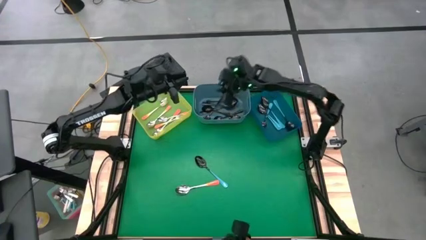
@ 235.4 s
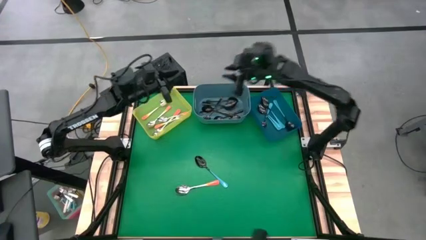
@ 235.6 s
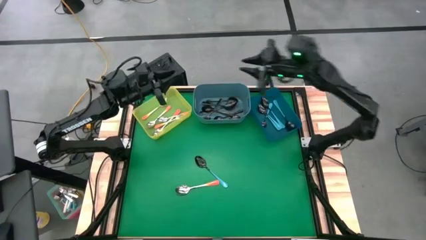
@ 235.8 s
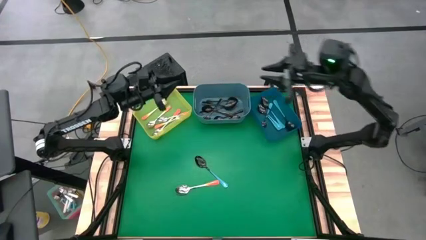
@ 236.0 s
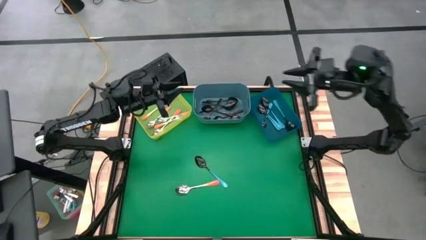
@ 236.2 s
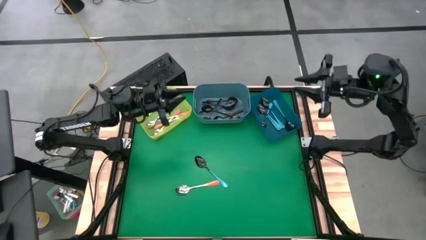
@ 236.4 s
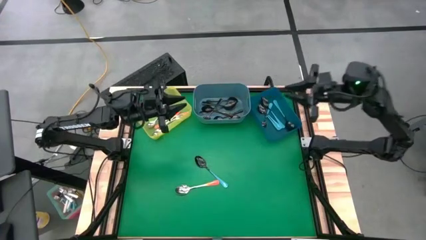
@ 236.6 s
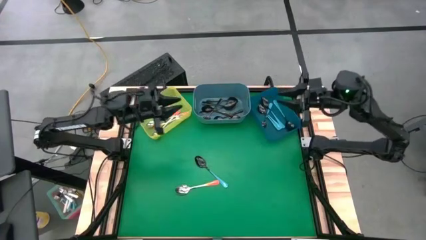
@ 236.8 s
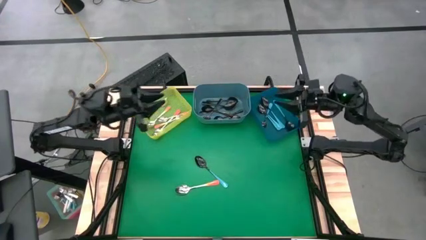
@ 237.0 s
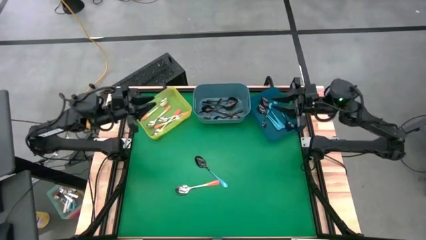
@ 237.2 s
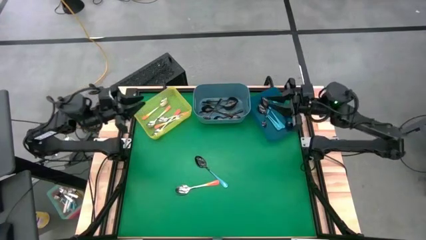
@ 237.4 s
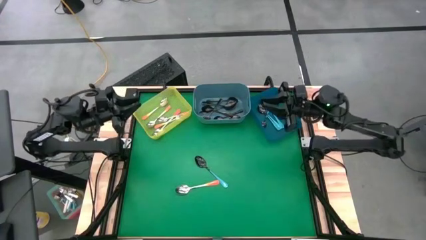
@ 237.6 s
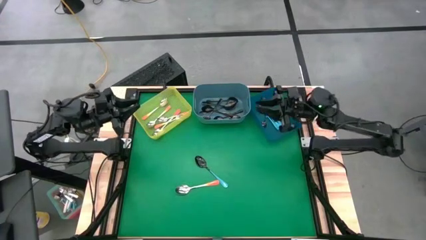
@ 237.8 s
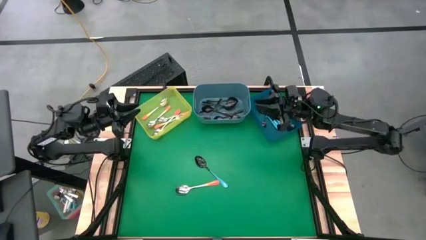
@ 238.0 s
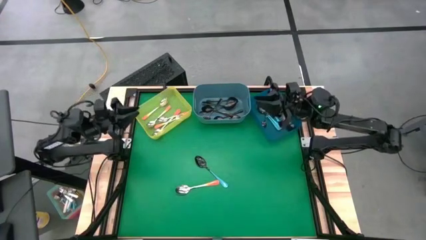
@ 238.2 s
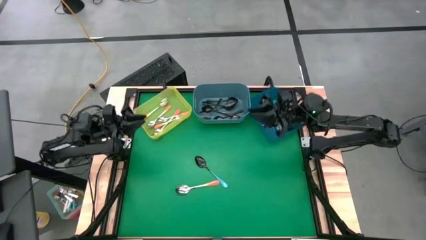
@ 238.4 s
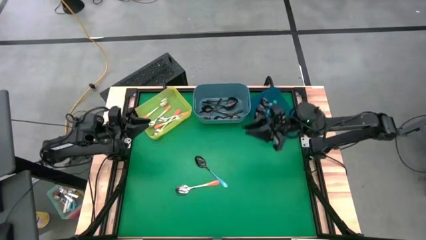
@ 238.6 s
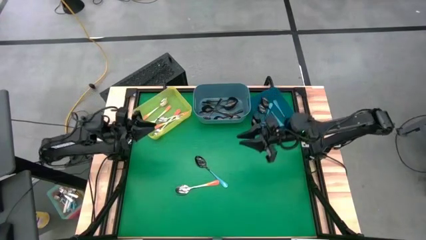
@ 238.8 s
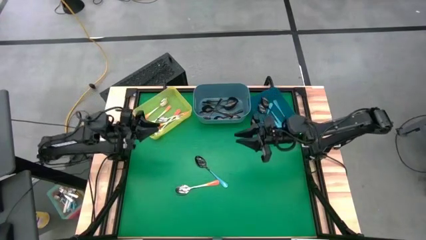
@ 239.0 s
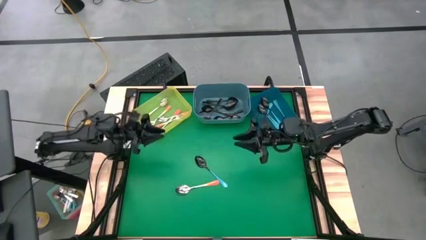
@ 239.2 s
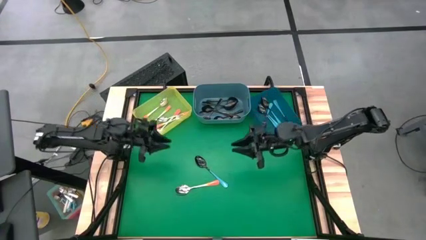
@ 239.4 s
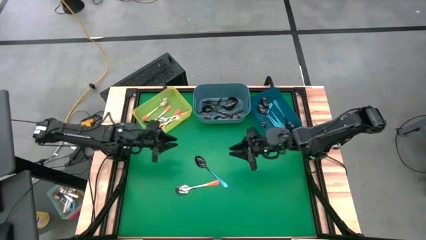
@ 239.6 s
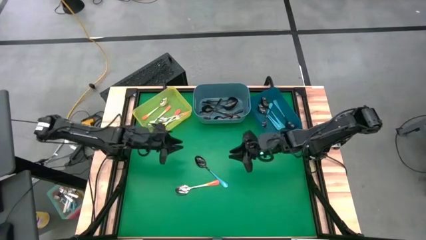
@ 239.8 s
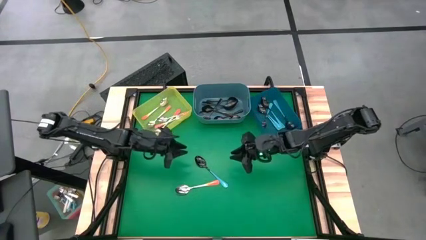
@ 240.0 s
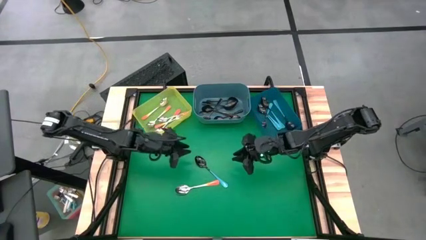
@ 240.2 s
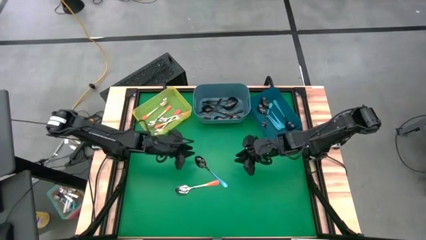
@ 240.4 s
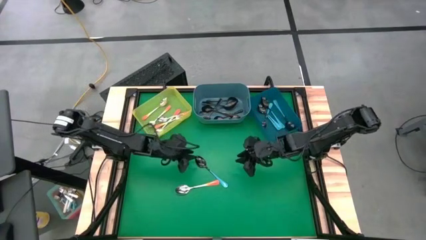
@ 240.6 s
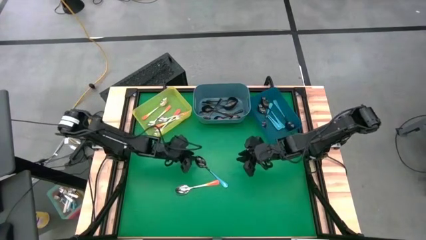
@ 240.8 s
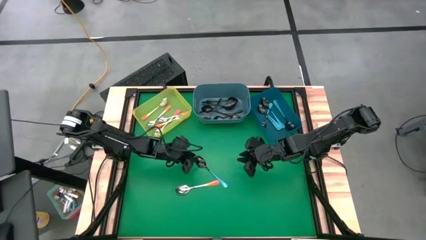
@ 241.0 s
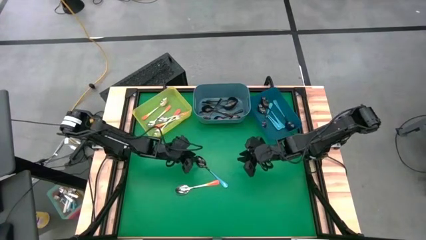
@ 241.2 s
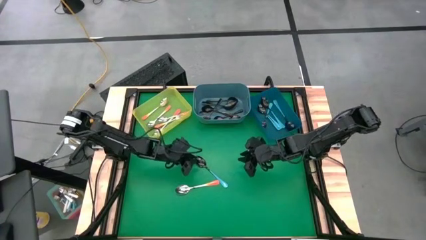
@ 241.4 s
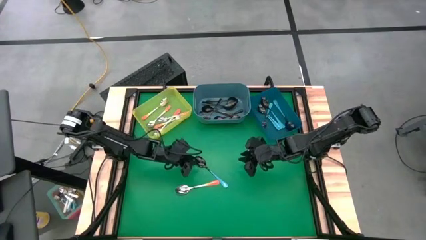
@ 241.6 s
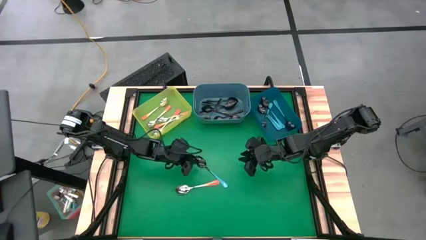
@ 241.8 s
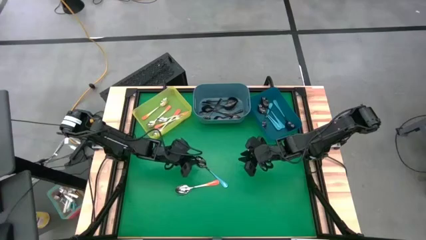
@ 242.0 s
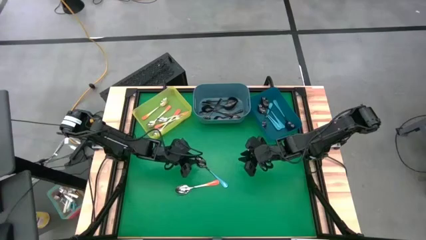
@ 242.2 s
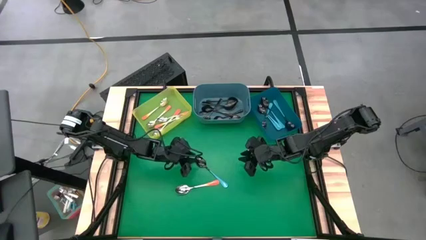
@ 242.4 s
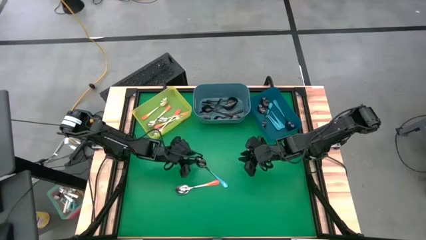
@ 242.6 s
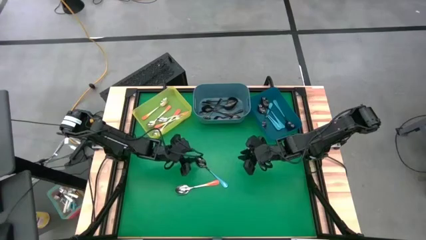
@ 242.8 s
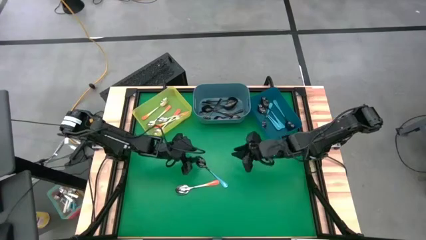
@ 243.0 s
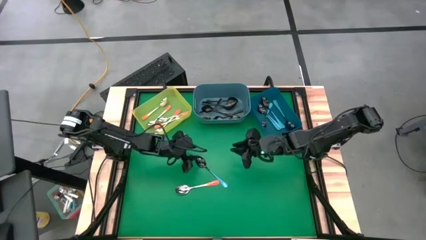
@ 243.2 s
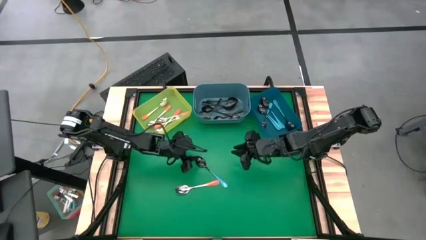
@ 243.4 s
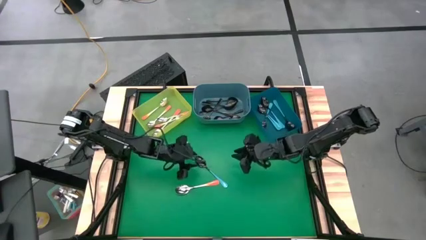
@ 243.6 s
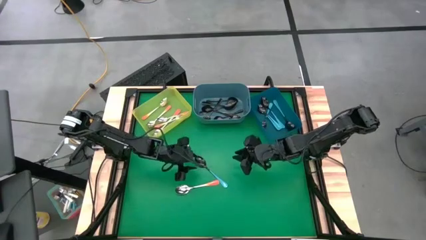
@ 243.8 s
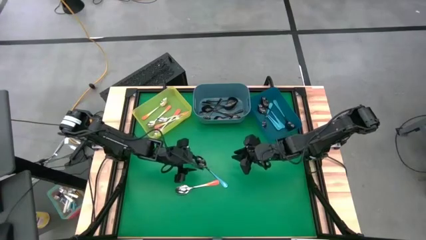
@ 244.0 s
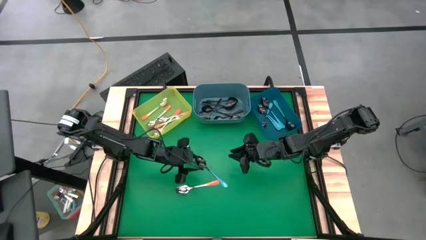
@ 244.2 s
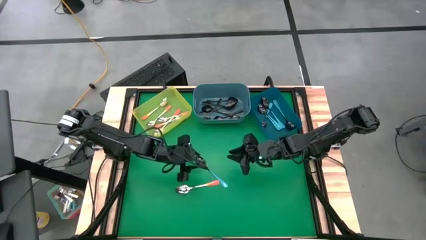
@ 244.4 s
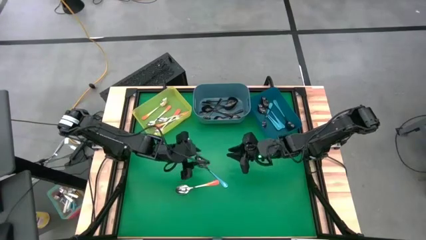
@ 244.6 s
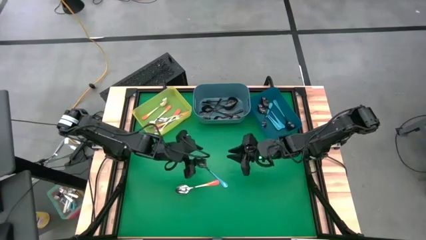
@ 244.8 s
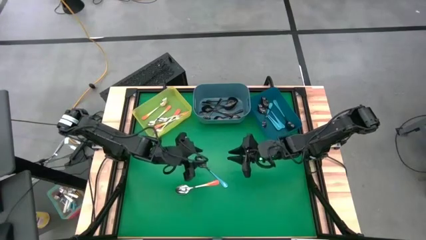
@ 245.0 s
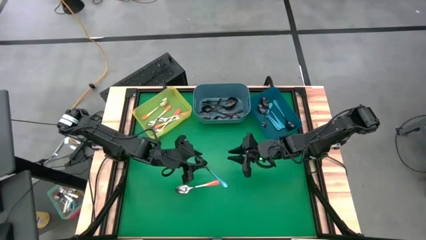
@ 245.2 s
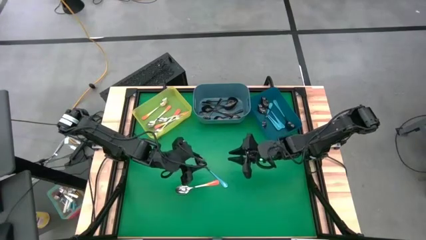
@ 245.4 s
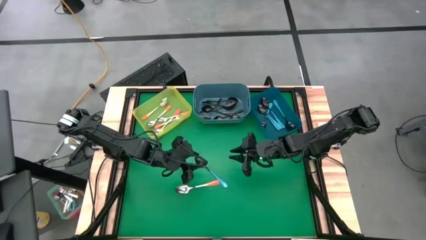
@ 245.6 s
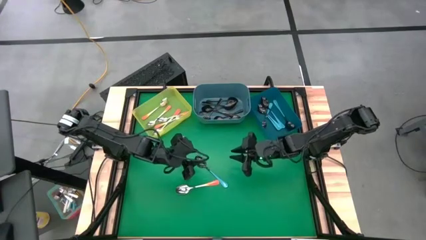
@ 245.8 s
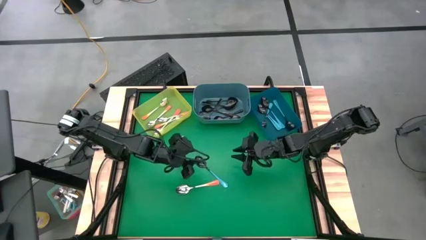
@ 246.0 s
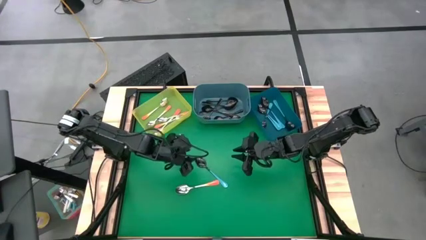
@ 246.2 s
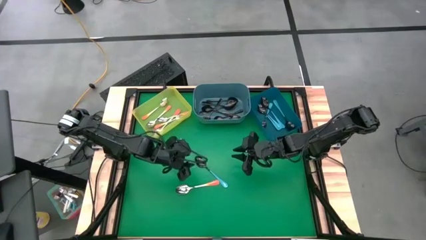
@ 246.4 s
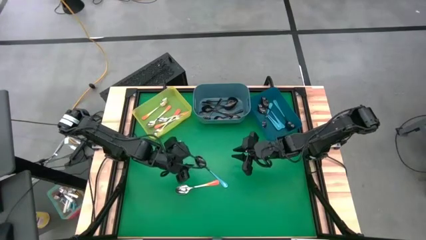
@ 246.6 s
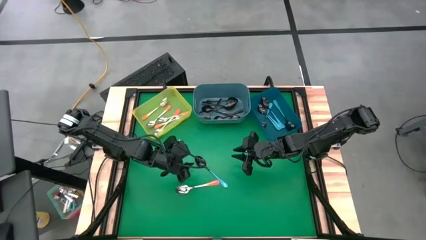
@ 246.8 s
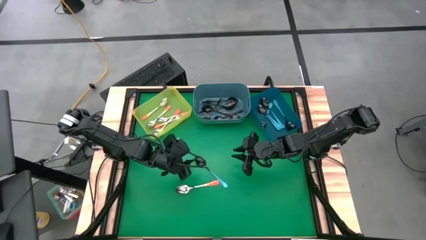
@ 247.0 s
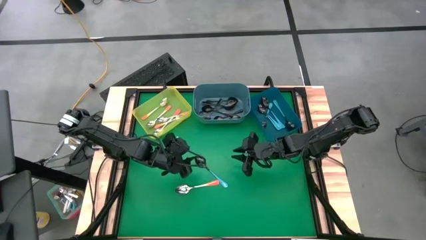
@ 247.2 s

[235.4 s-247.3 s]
Task: Sort silverware by color (type)
Put the blue spoon into the blue bin

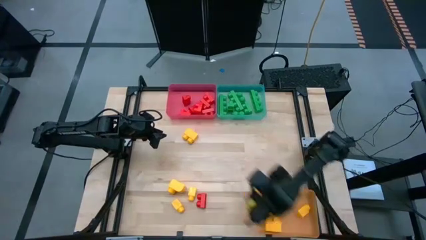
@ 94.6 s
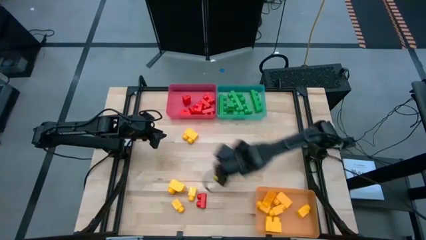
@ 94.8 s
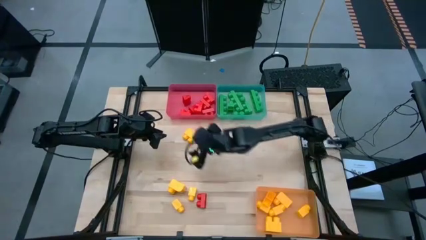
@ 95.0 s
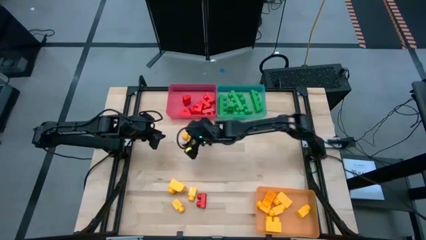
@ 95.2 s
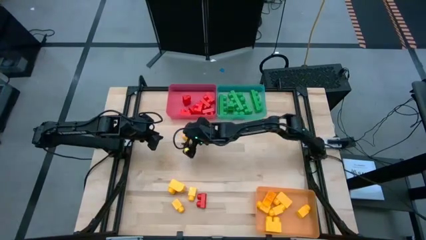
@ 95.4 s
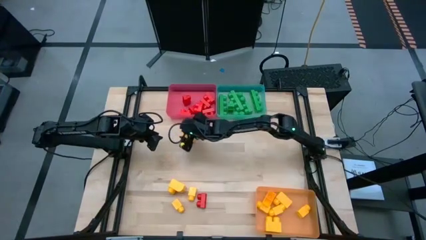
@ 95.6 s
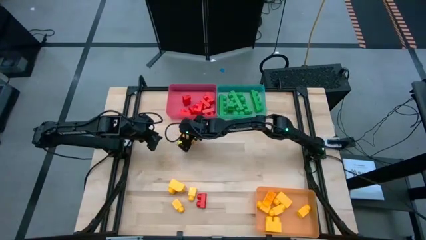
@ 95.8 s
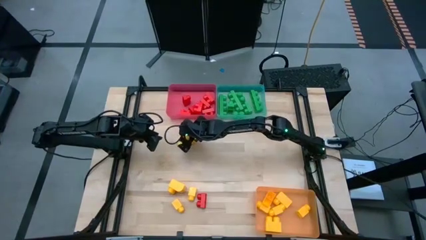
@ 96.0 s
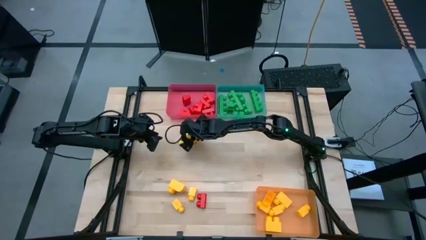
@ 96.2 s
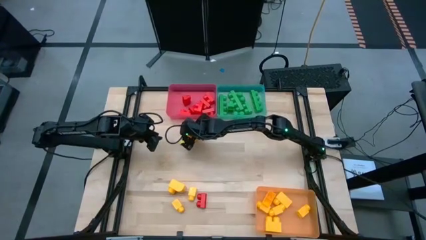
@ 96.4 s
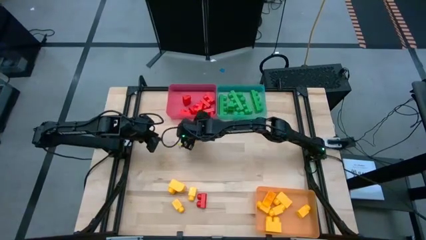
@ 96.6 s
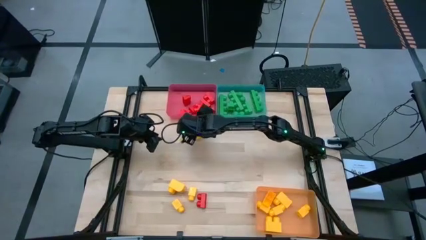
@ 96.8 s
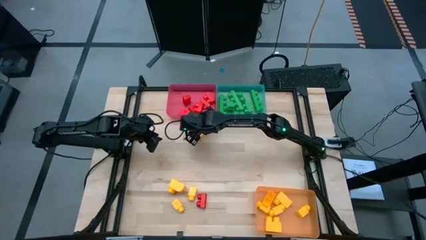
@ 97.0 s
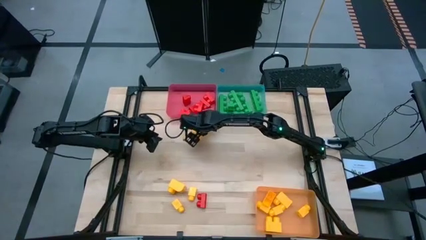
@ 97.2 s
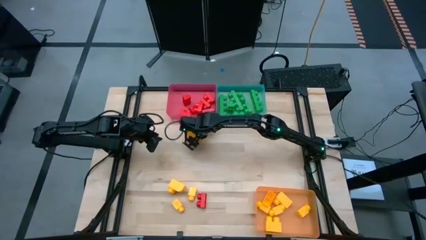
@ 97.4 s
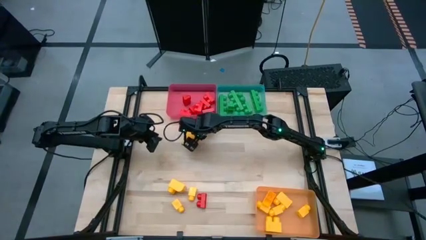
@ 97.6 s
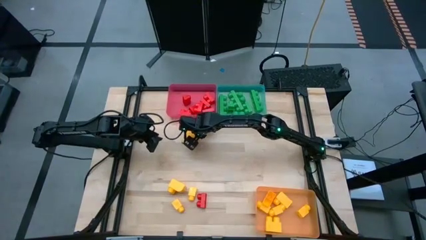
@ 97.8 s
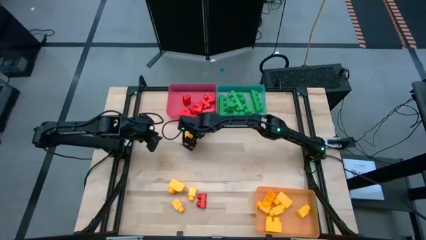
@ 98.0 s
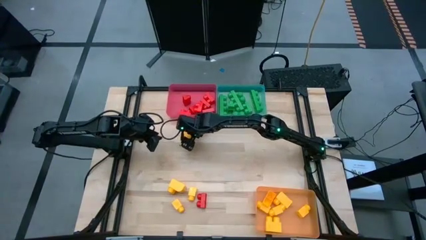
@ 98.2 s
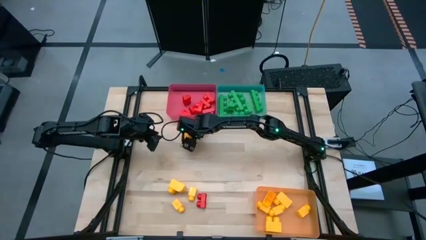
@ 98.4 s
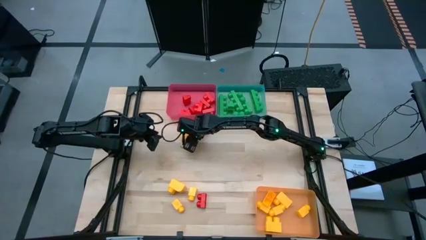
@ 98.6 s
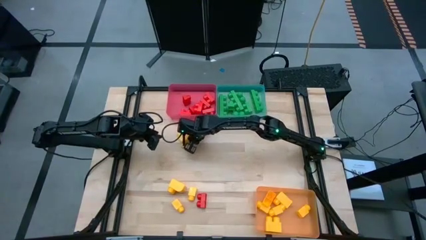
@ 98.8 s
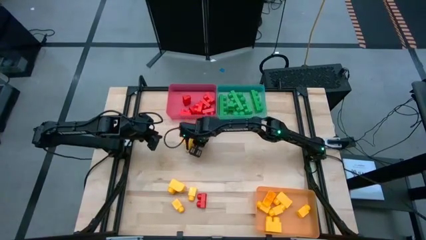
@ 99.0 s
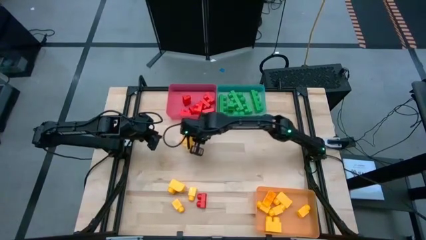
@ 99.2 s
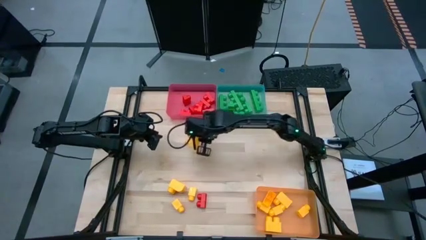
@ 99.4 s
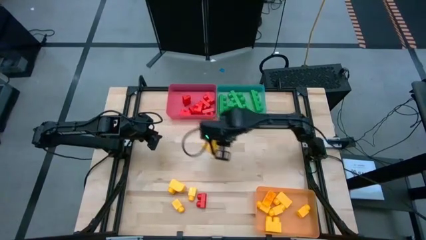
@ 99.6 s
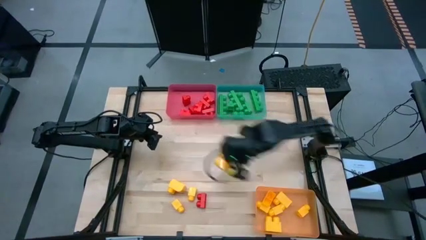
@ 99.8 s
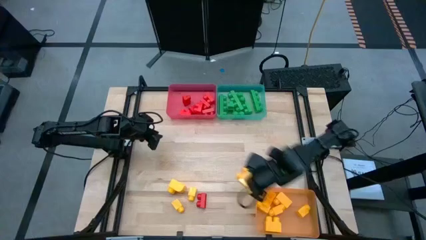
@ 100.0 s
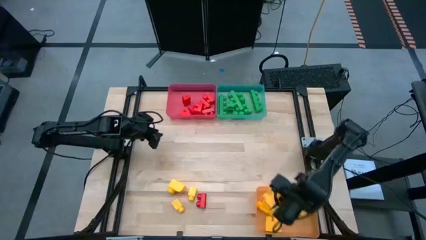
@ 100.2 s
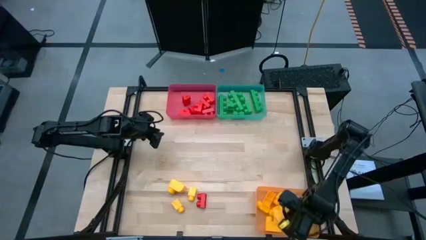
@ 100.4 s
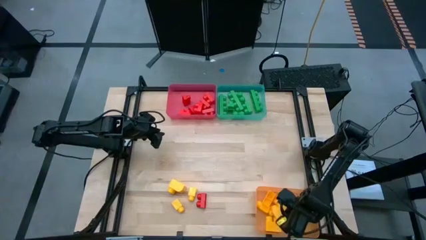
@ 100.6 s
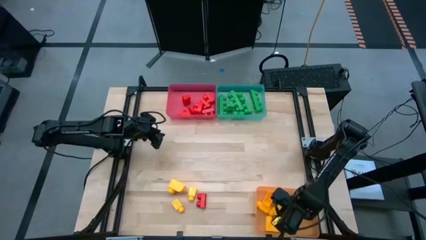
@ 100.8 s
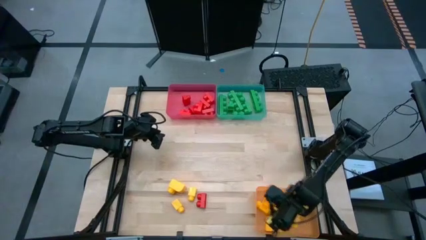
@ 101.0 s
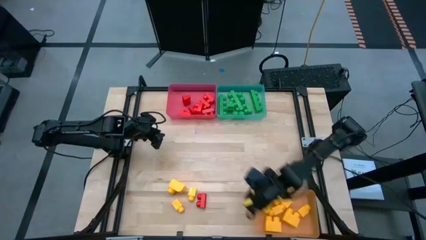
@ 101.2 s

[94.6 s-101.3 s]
Task: Sort blocks
Put the yellow game piece into the yellow bin
